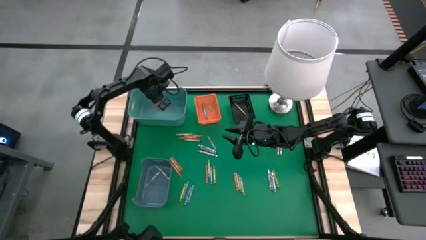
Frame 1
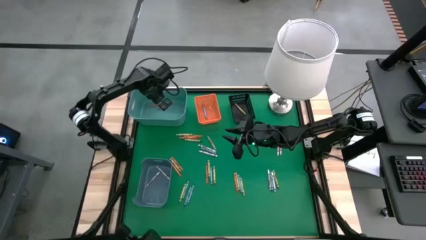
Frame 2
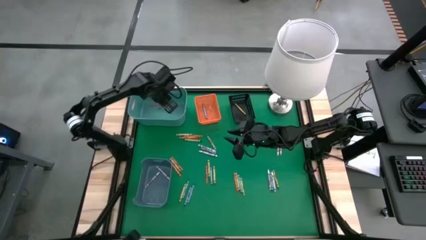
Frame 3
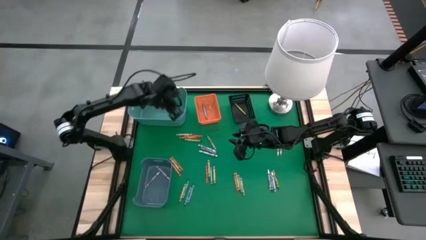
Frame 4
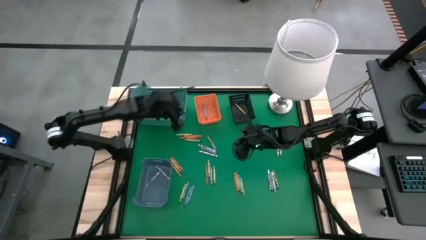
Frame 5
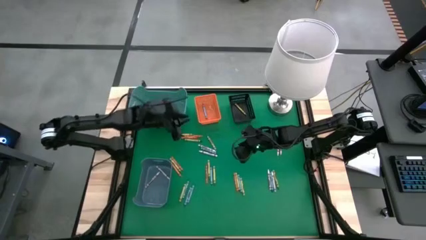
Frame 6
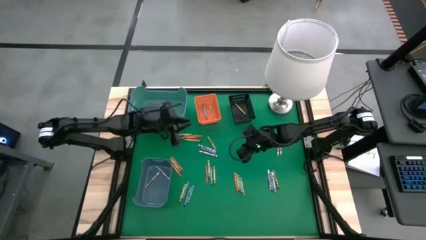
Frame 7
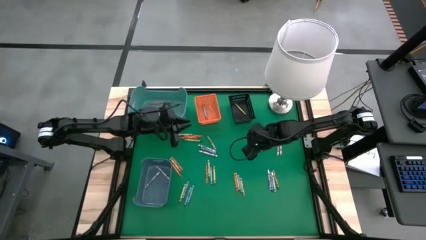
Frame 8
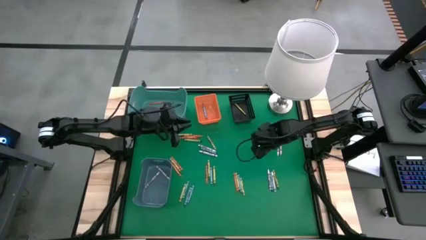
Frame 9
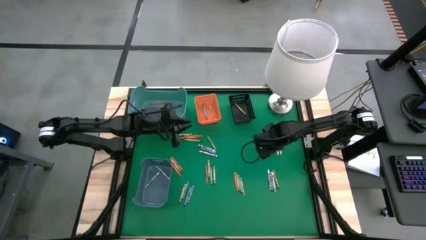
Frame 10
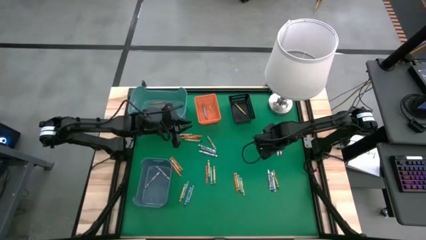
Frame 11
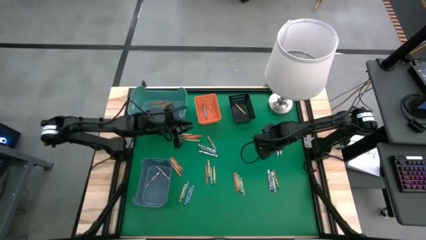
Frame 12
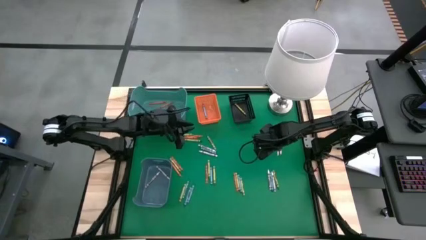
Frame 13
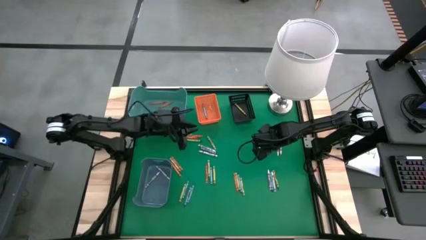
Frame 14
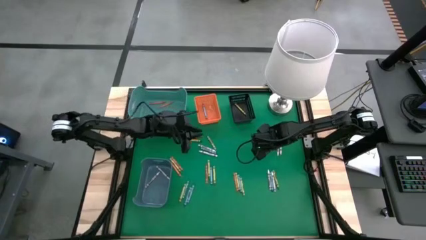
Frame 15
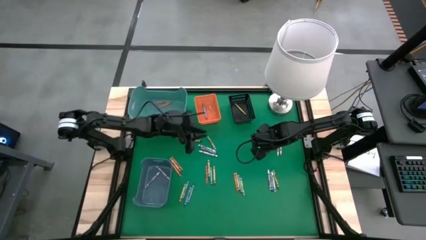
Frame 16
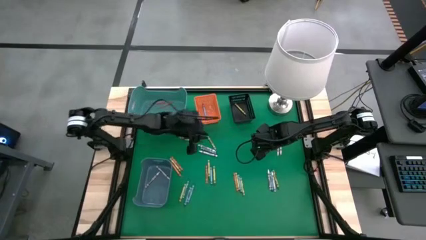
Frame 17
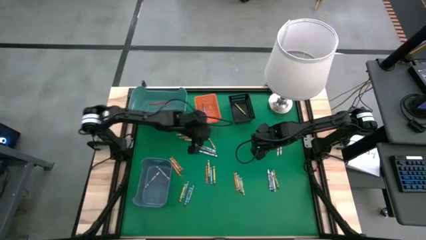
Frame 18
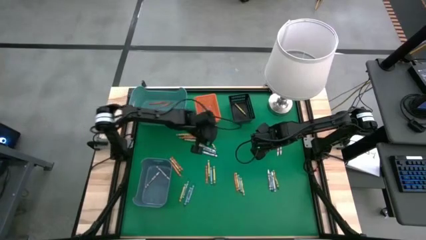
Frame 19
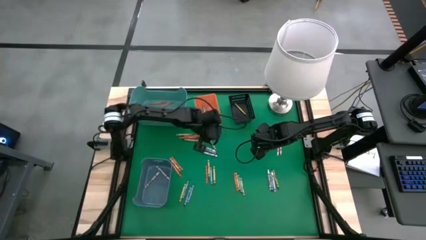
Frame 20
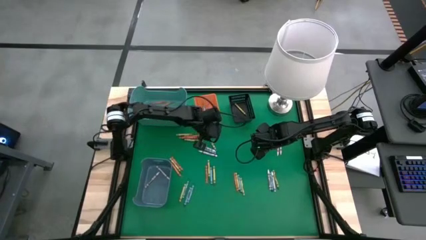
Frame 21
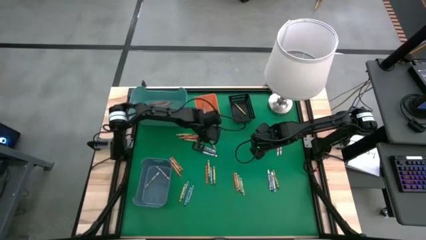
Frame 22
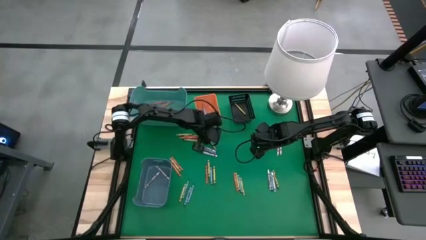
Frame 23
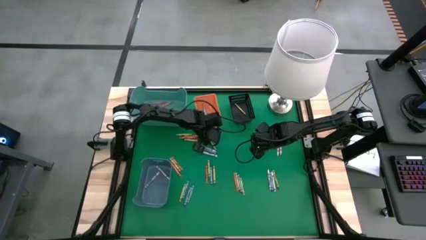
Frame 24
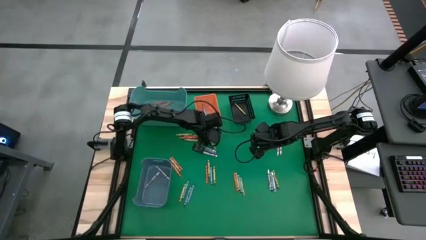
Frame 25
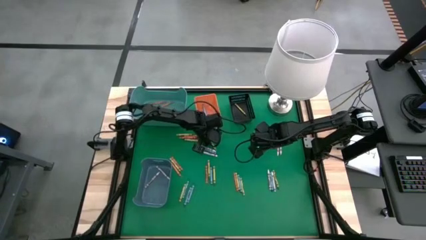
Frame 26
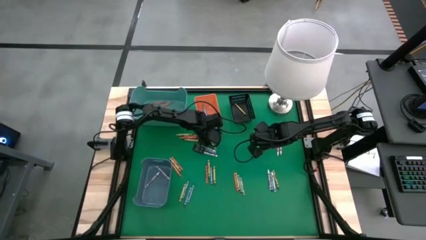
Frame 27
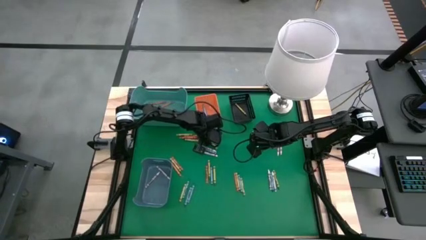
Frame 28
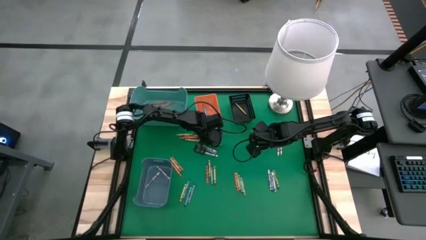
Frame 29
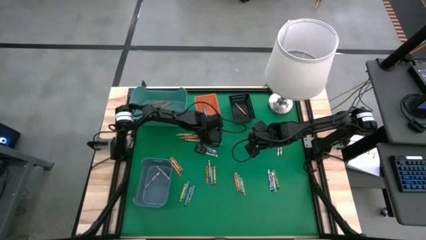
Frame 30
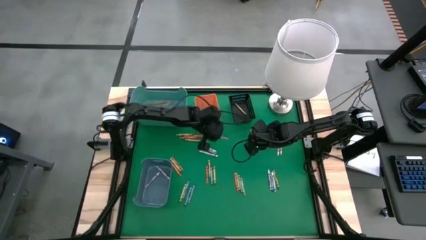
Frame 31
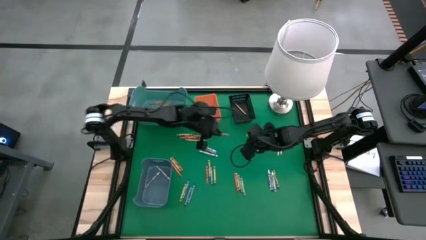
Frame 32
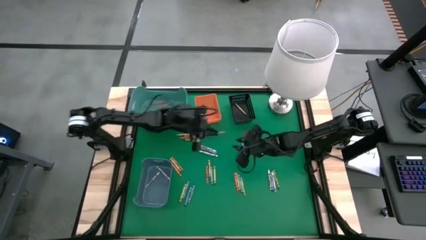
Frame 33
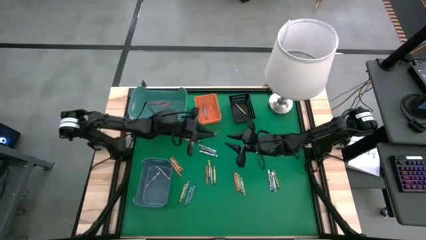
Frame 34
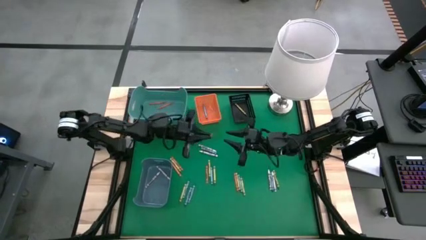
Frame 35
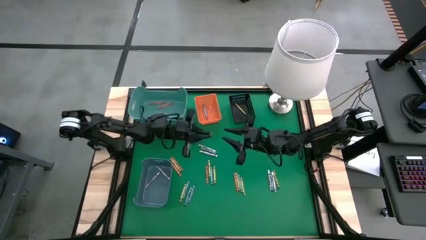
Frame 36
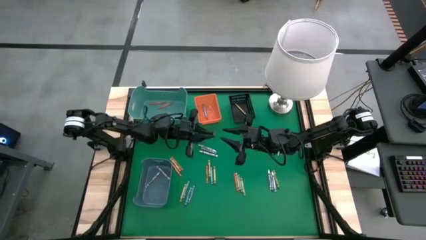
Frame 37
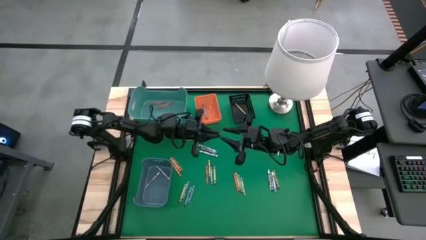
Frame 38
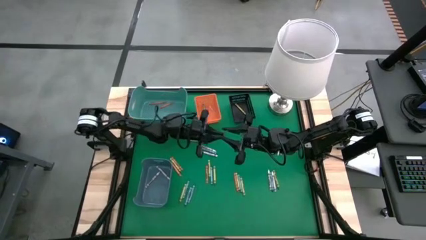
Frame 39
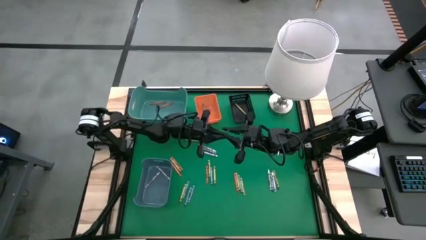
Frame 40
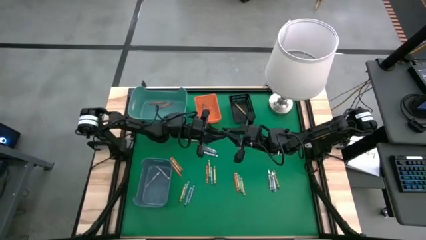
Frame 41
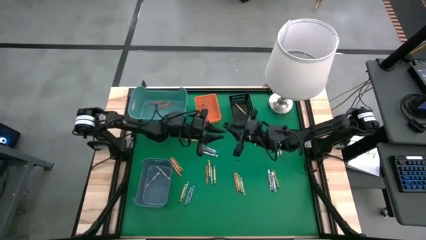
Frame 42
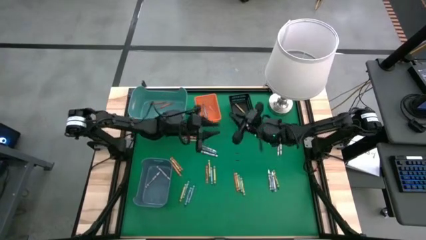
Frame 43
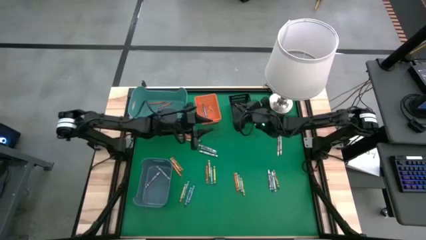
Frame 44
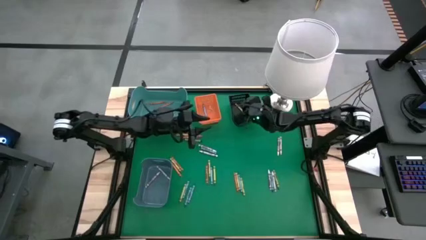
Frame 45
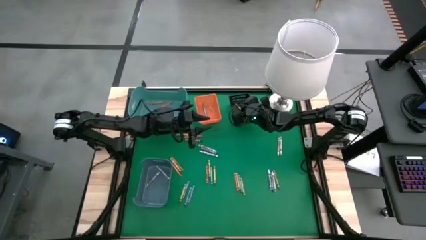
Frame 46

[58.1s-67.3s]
Task: Sort crayons
Put the green crayon into the black bin

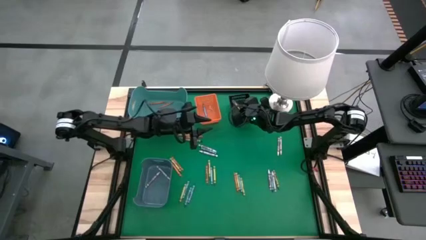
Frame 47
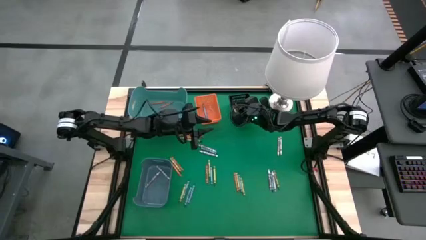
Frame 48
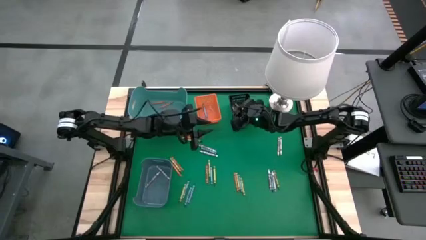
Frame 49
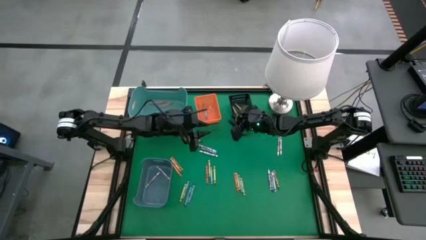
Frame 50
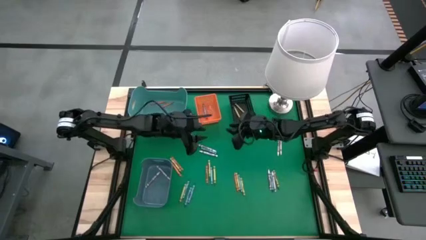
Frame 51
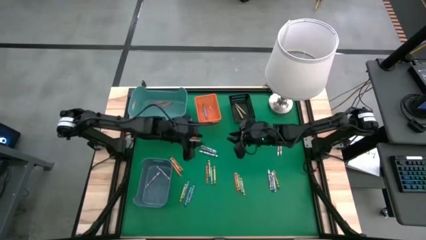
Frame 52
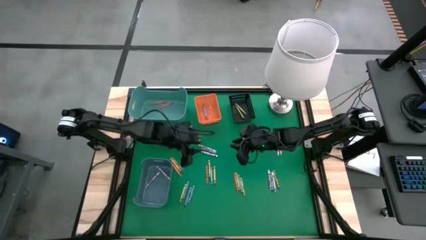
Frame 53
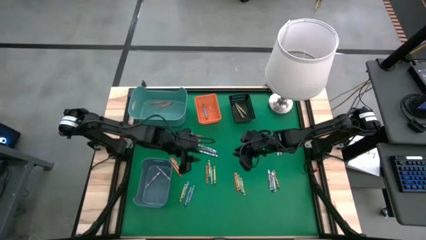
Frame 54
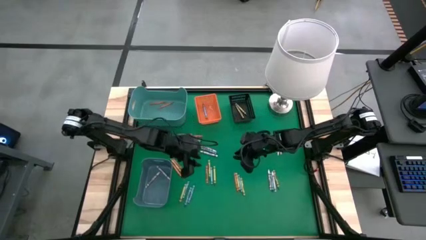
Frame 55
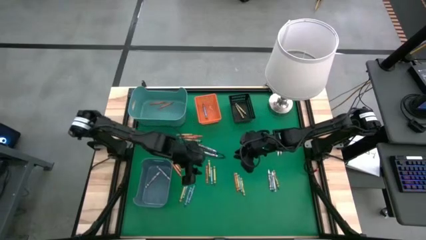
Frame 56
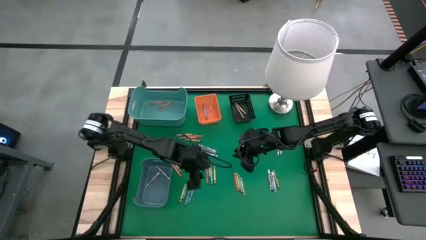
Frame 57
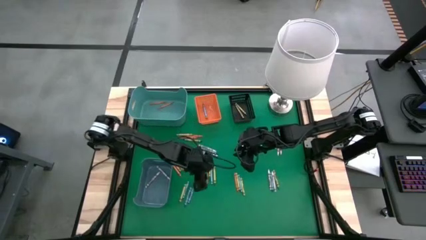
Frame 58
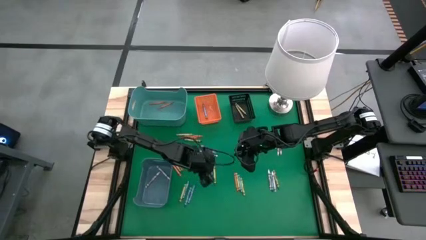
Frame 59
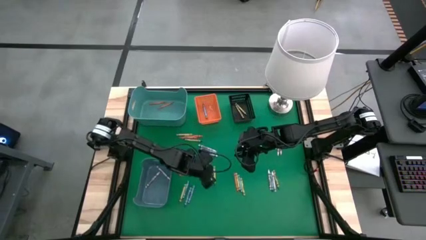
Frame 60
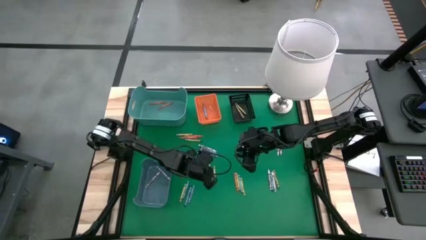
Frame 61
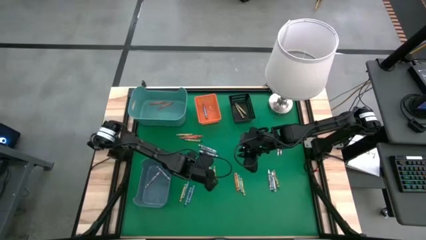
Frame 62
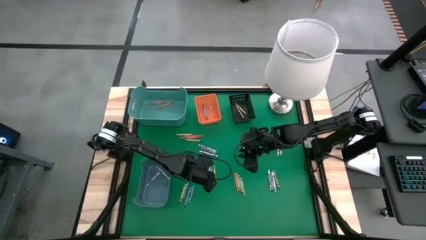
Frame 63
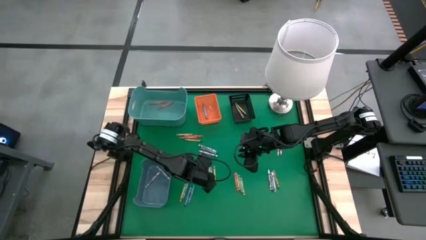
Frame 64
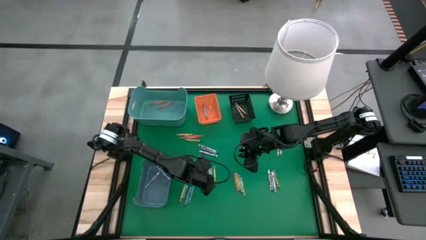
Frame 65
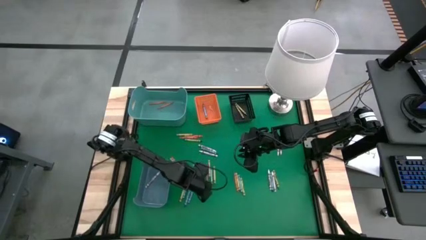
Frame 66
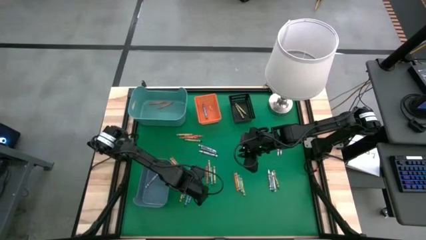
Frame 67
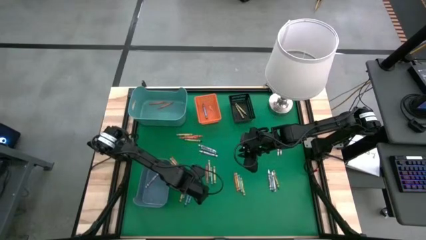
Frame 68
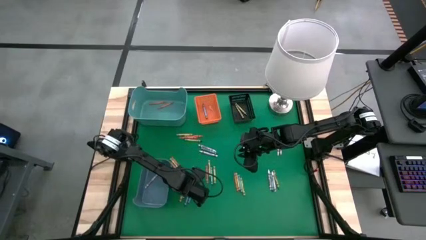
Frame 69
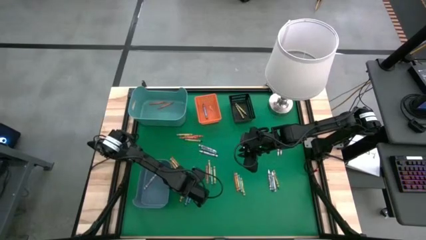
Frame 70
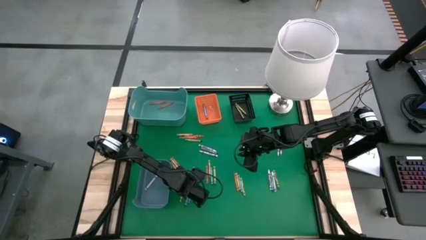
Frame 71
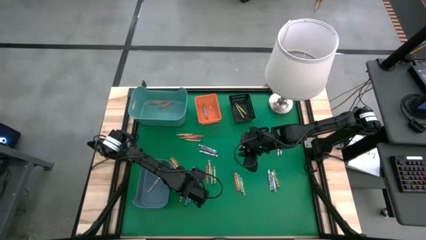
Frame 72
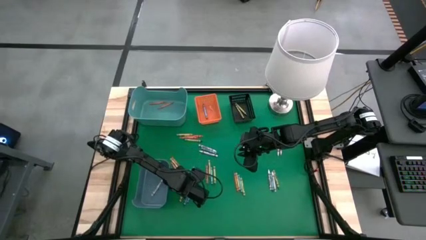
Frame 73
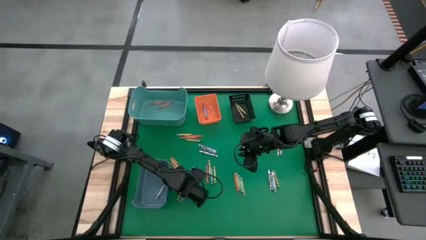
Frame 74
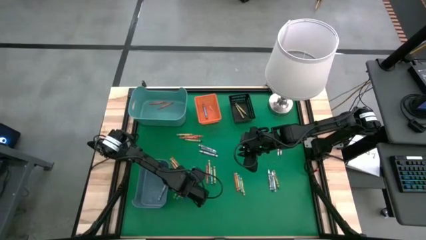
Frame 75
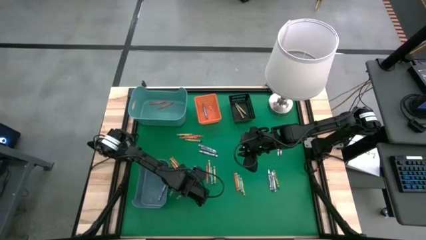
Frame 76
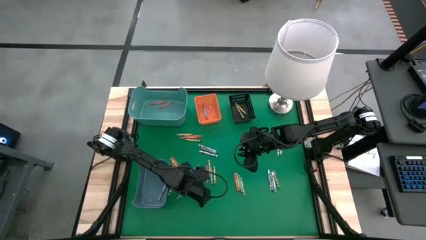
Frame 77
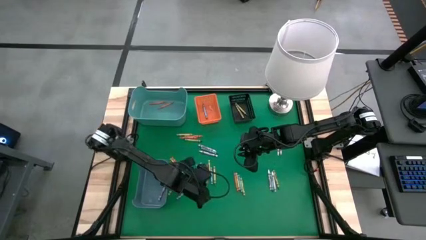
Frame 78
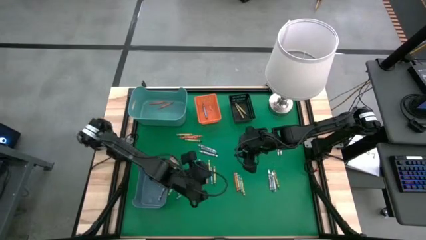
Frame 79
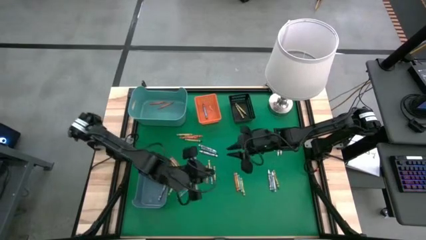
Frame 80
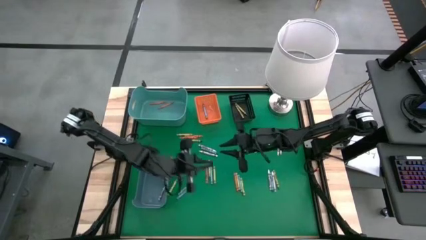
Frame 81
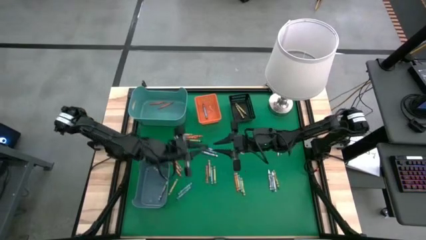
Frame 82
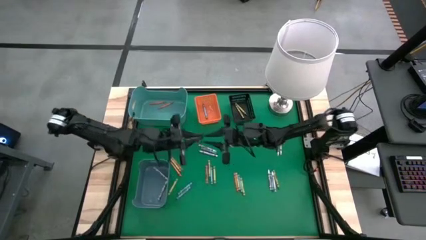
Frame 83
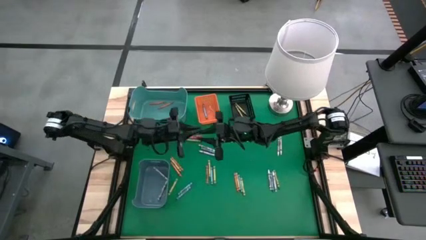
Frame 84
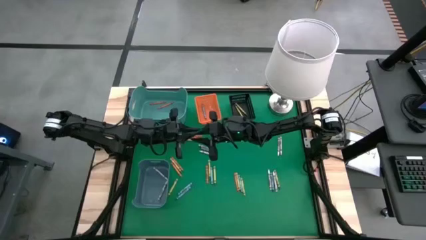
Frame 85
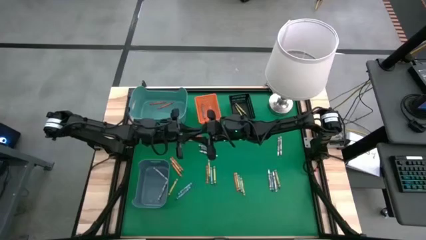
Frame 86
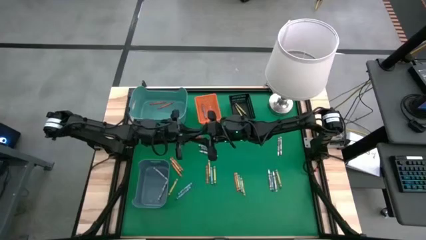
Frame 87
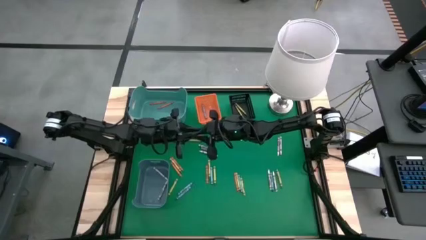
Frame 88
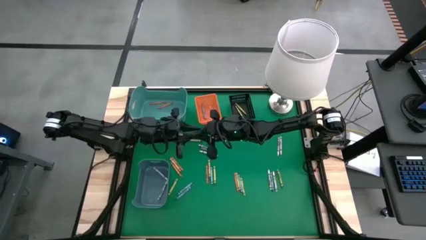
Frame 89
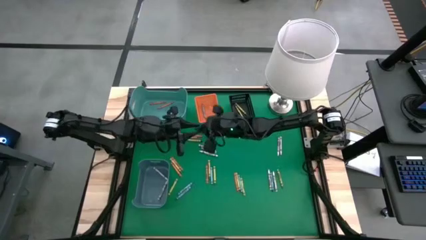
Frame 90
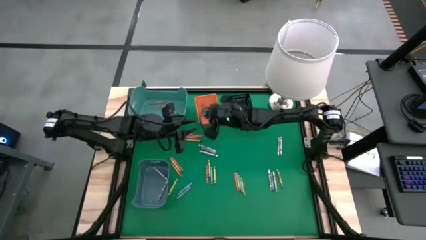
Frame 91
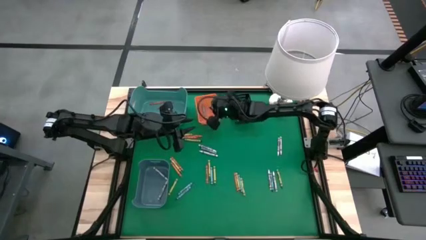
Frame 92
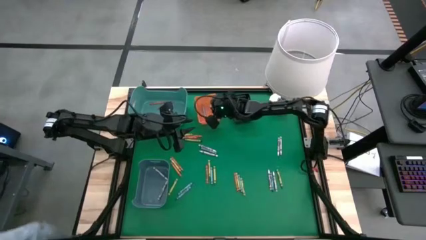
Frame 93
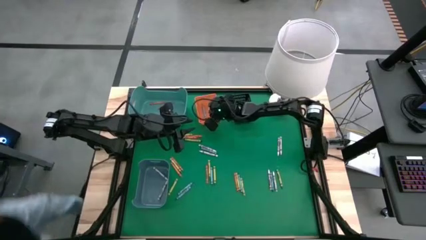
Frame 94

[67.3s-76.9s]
Put the blue crayon into the orange bin
